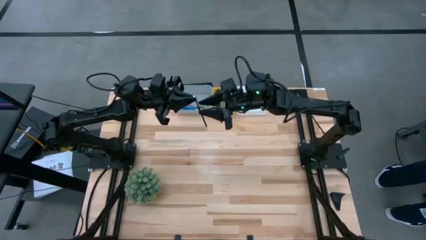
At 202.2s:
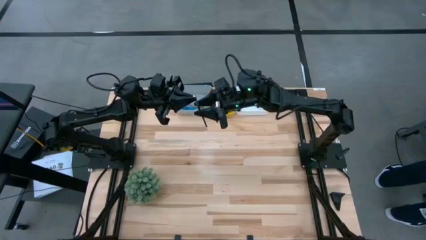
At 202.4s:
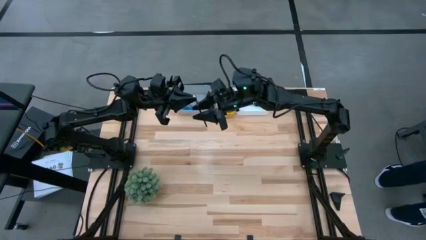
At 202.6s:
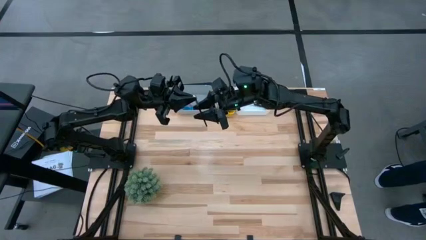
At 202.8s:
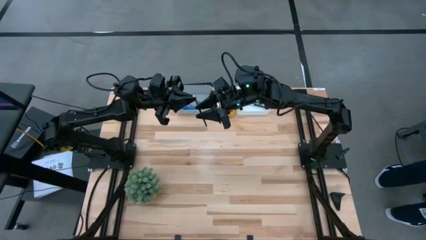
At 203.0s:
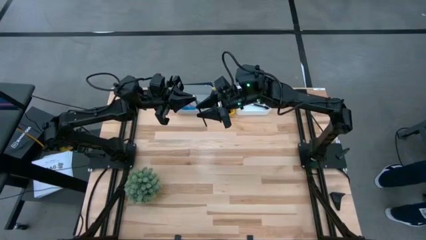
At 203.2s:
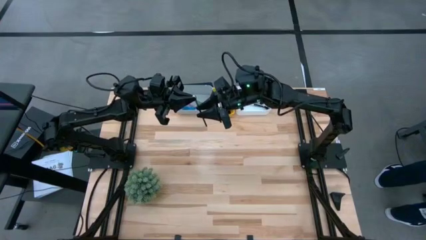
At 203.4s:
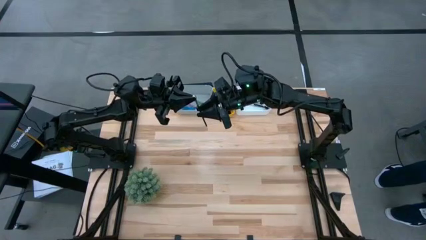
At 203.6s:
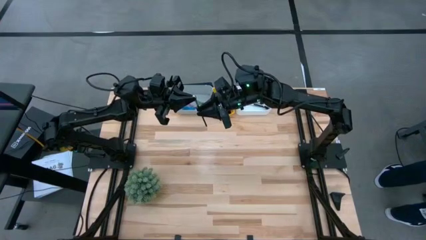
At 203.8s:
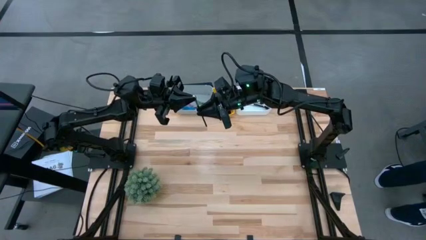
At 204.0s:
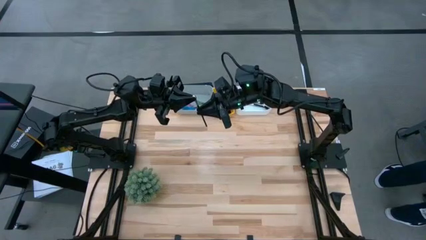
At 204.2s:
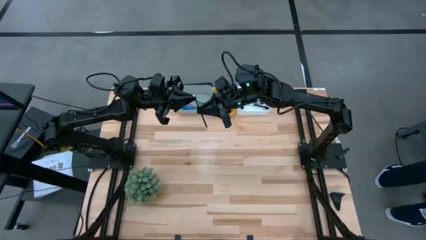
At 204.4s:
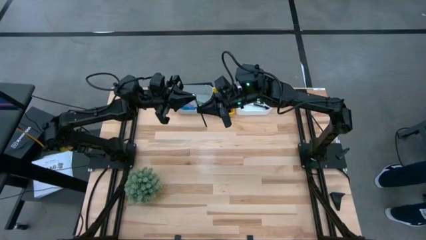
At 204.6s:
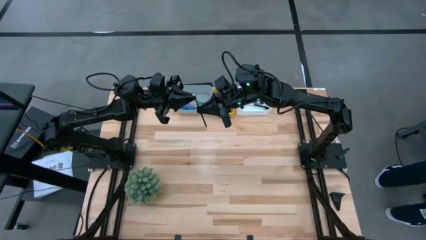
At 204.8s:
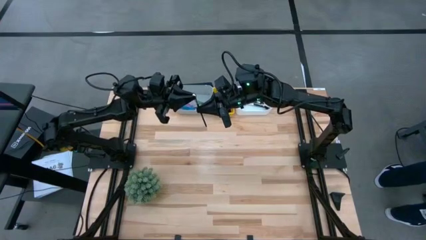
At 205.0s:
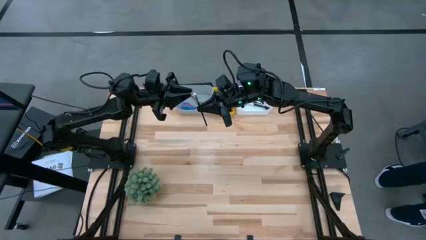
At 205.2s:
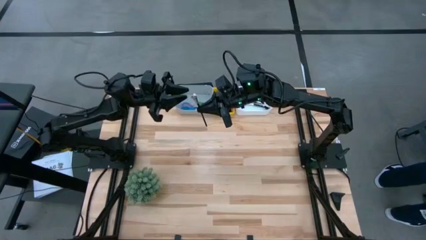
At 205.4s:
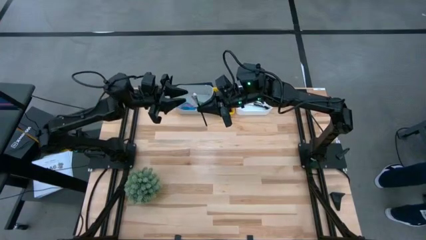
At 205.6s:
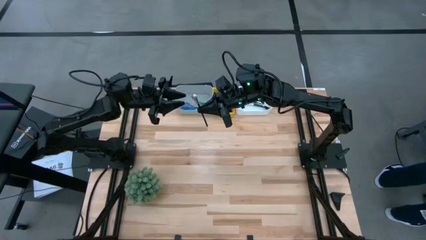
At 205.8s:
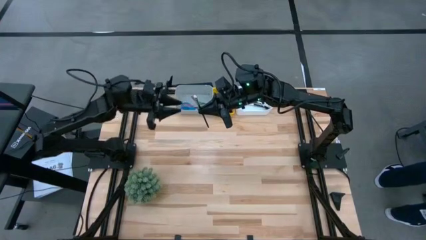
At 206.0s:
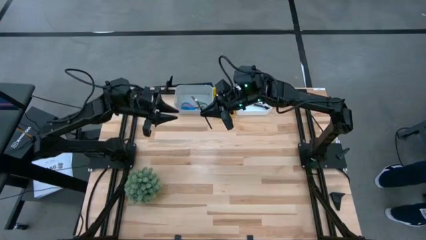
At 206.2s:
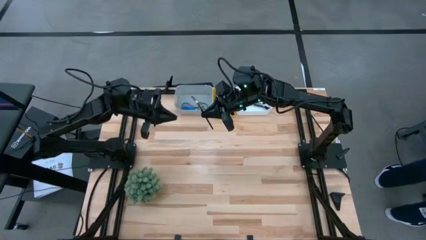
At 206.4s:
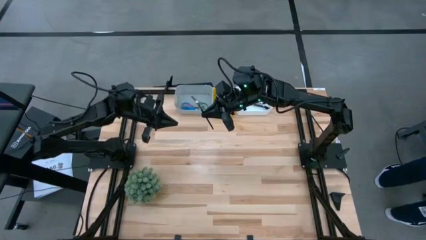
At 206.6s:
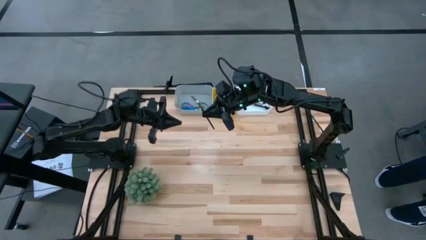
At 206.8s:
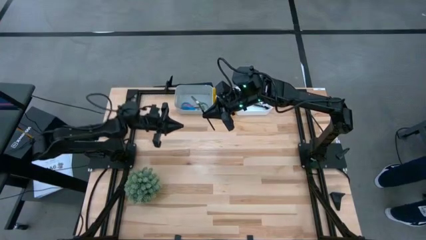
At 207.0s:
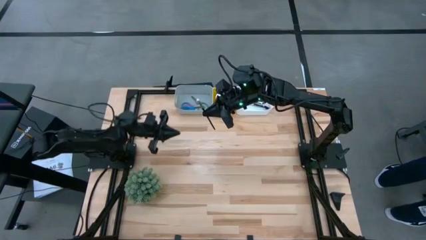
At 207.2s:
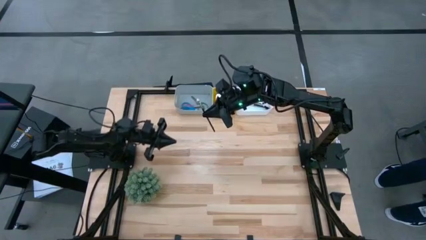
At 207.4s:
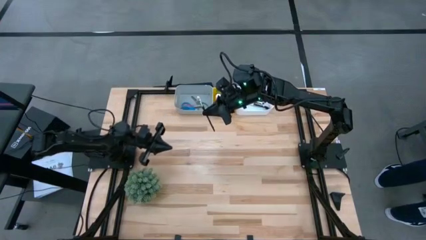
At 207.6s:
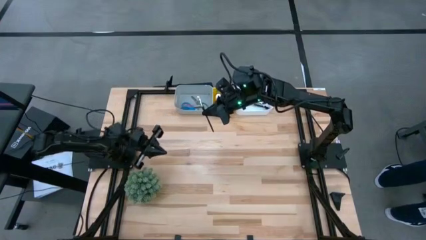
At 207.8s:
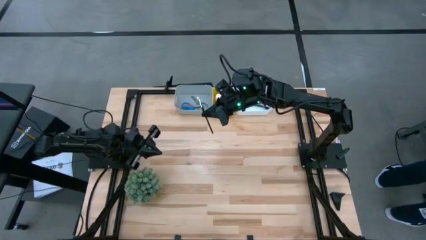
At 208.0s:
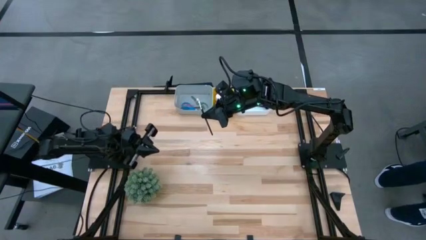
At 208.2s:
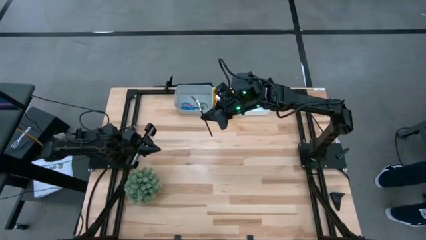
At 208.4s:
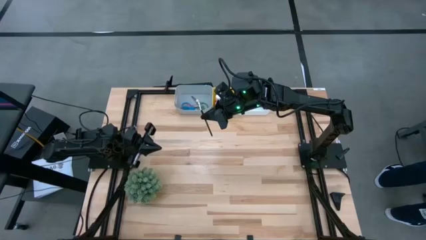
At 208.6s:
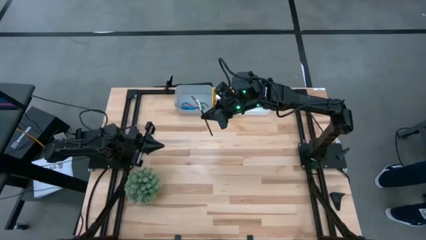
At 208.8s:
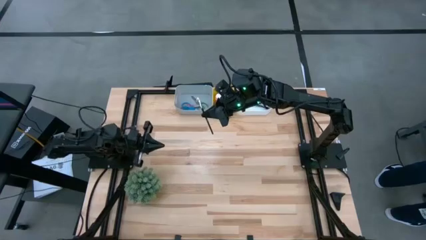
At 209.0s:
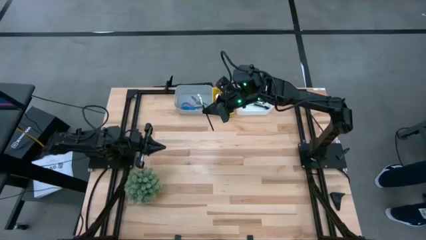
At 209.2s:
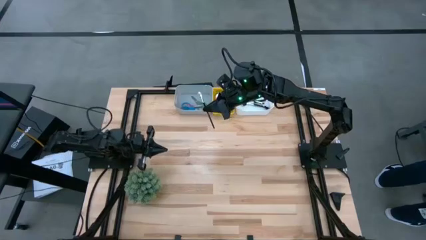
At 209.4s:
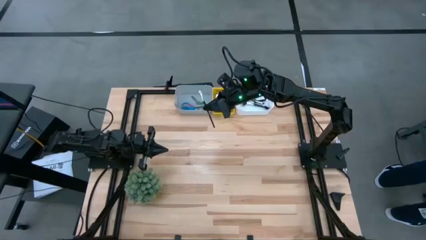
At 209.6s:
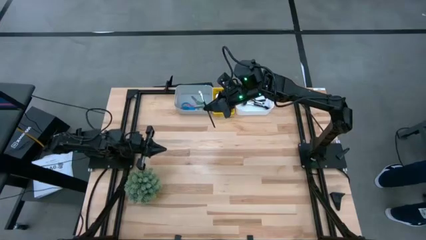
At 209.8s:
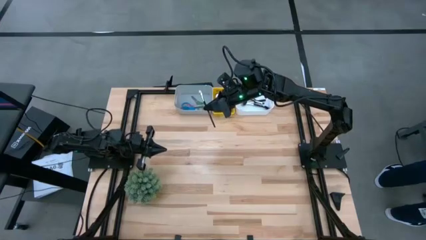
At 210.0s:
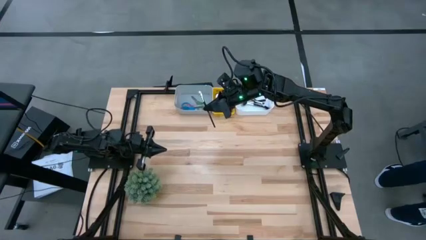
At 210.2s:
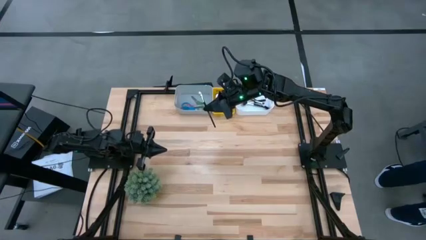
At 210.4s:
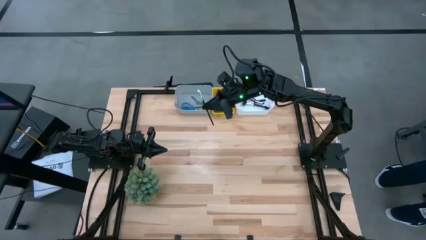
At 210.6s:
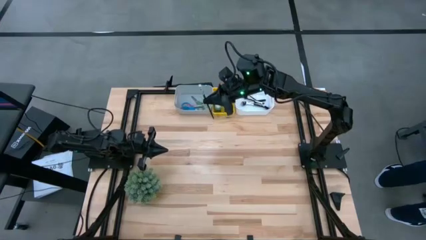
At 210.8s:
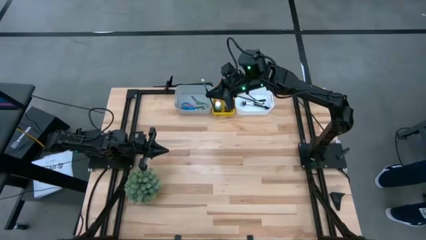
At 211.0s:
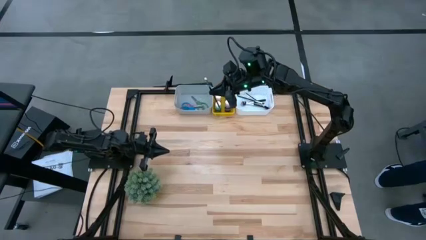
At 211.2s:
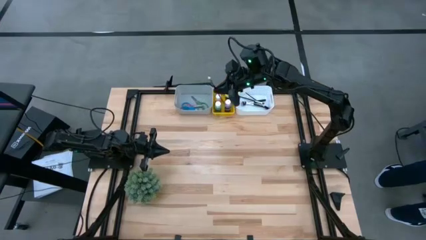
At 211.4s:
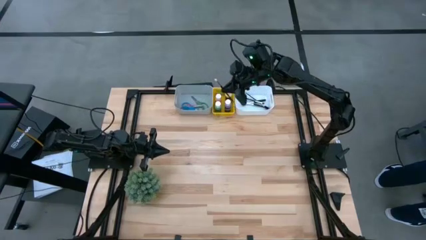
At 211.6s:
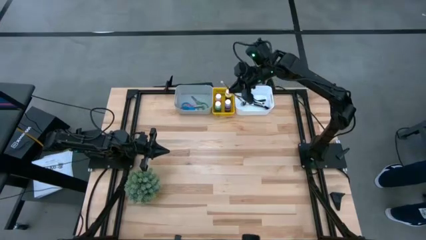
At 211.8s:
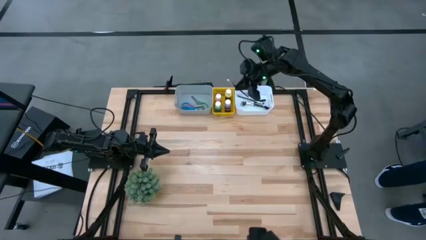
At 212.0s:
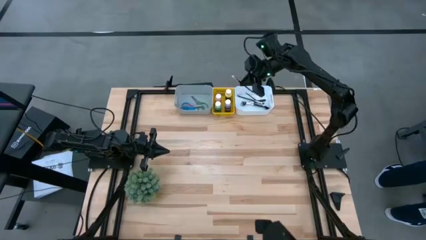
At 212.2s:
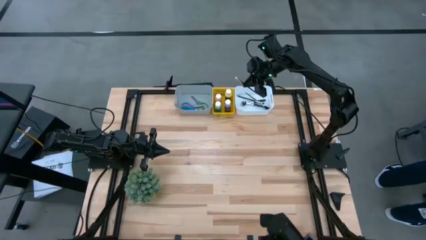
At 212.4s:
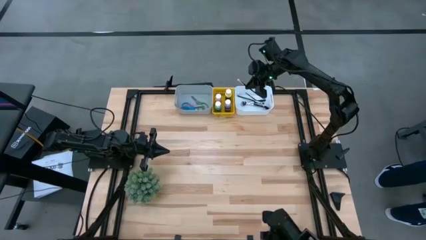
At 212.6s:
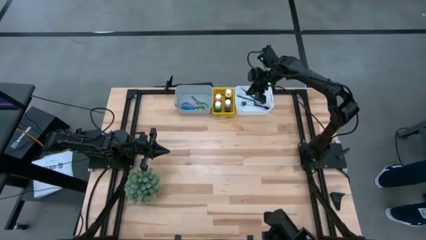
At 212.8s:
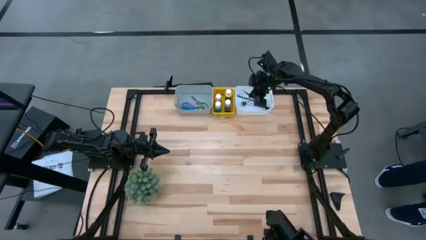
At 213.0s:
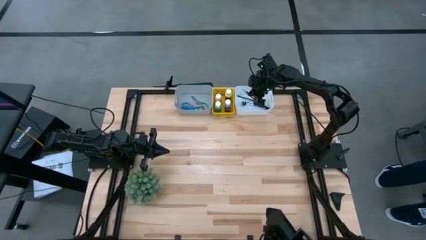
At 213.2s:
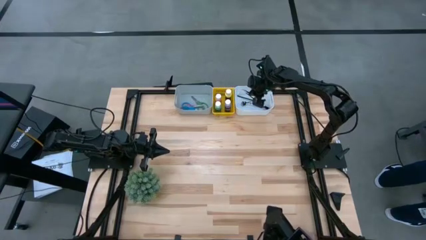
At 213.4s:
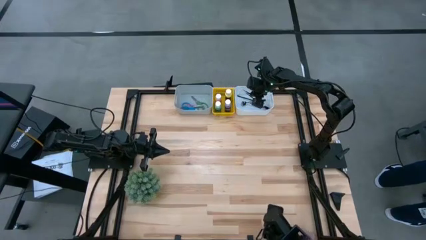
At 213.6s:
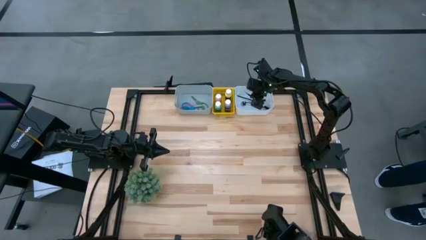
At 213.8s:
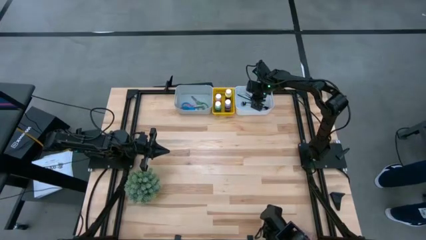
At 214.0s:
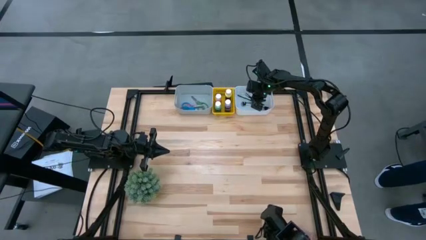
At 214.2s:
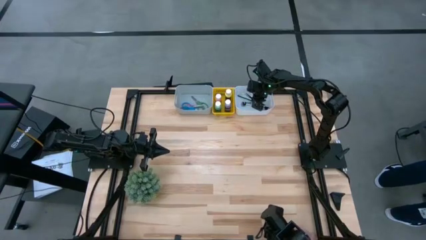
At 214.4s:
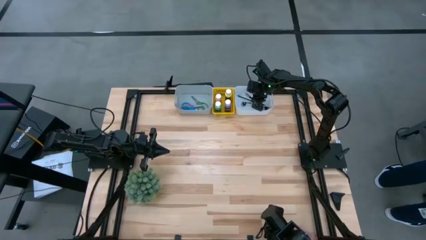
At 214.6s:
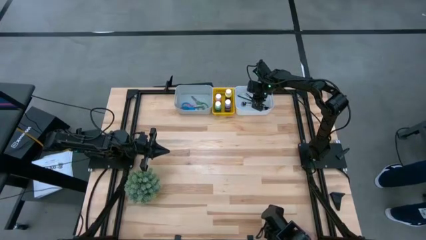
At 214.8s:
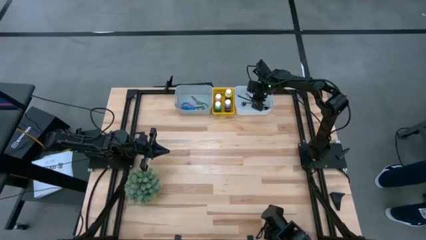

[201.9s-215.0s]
Task: Pick & Place Paint Supplies
Put the eyeshadow brush into the white bin

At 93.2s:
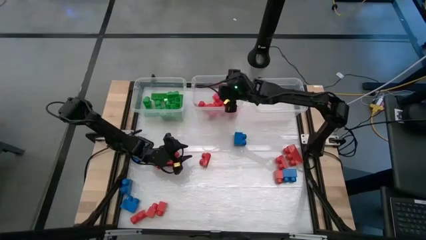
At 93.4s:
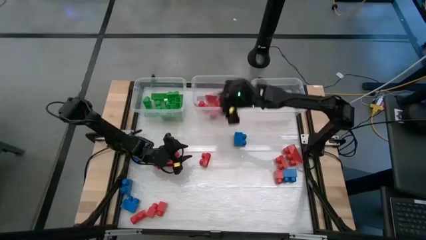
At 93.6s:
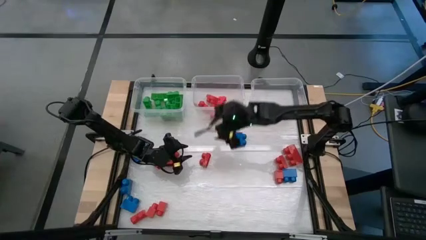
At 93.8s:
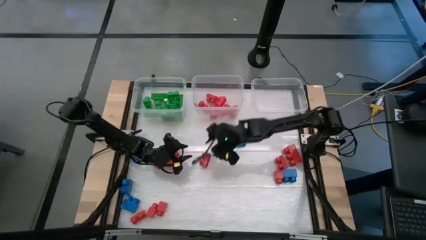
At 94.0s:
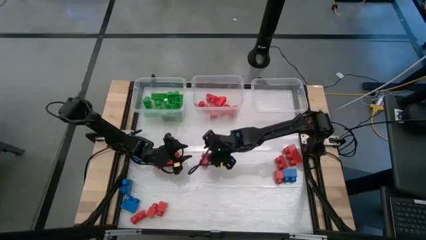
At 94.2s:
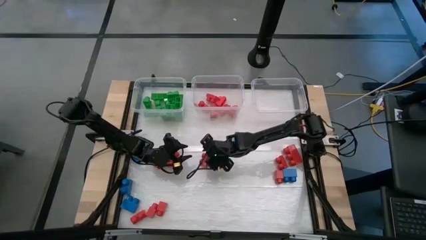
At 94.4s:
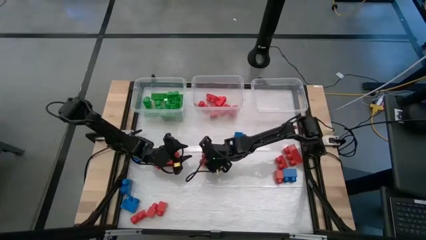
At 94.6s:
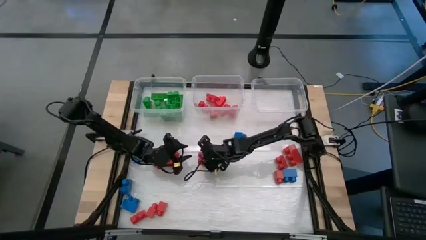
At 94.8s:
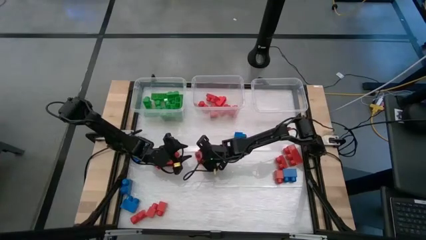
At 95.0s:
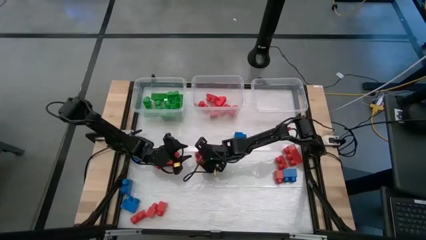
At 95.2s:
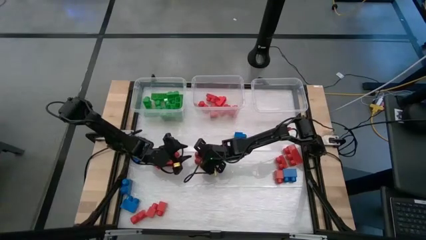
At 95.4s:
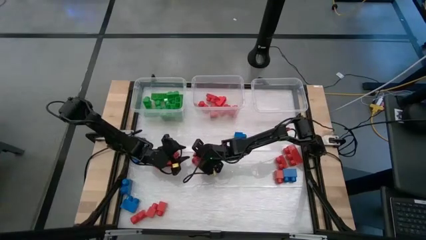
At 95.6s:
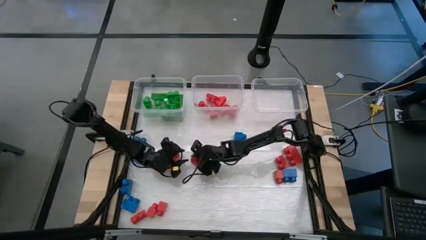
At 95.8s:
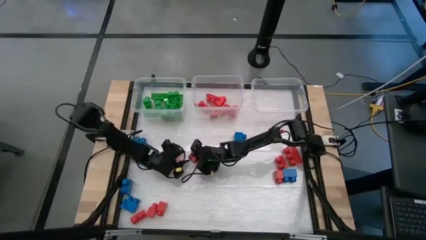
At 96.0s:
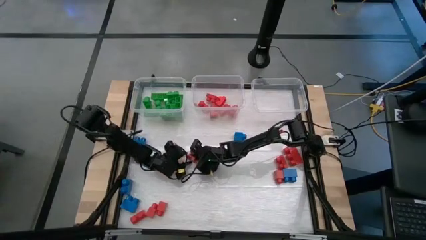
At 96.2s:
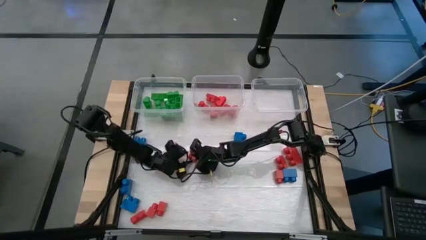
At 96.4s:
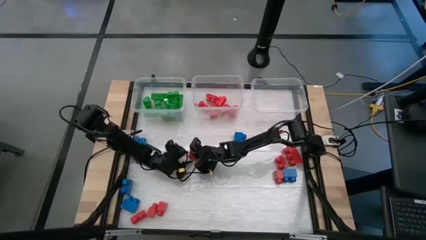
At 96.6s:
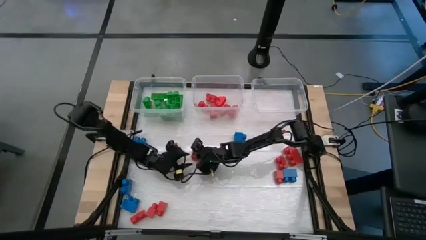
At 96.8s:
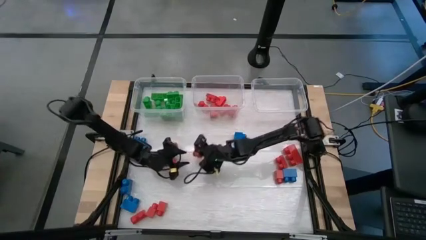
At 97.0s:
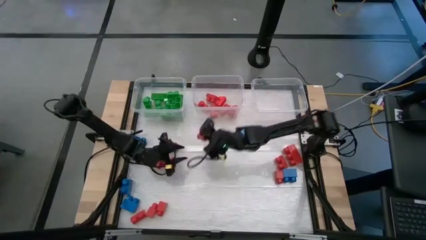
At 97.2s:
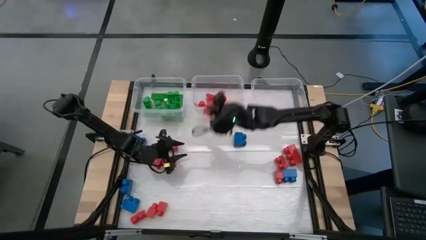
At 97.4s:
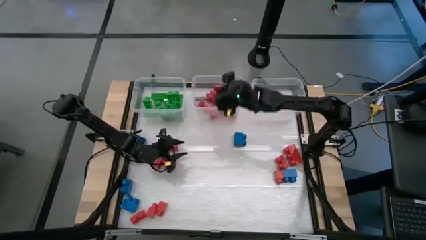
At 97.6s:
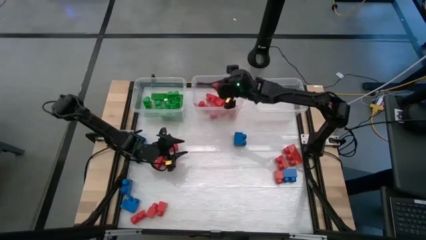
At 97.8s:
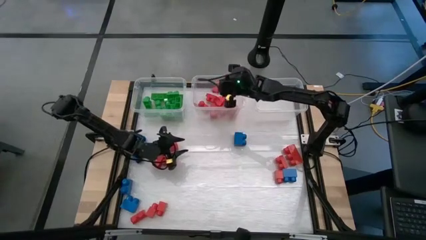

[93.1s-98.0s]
Task: Sort blocks
Put the red game piece into the middle transparent bin
